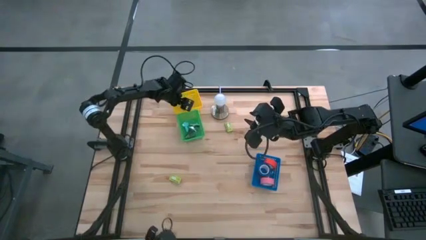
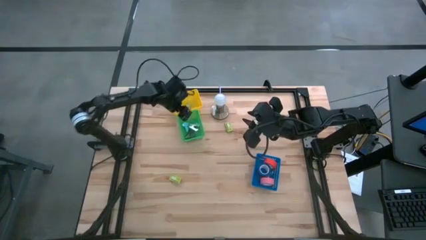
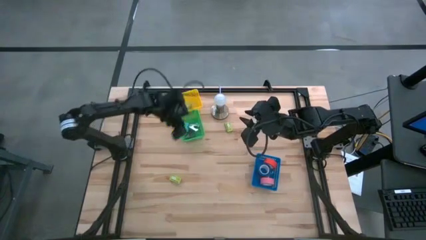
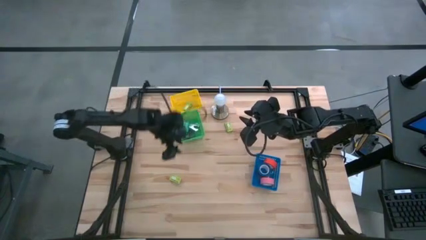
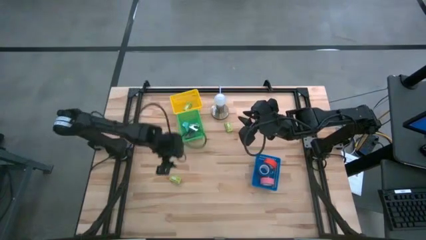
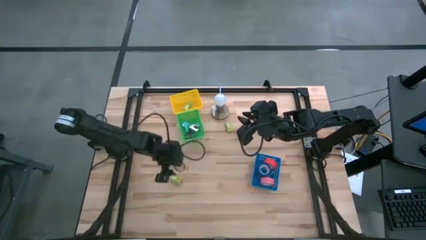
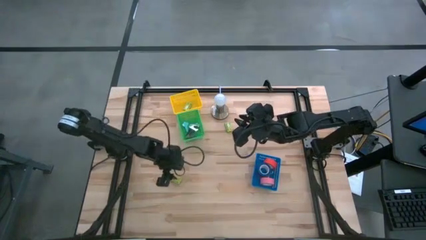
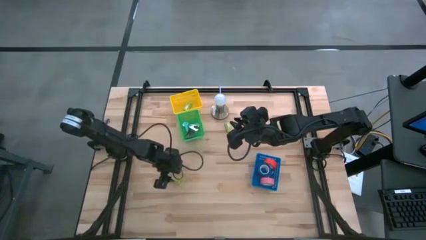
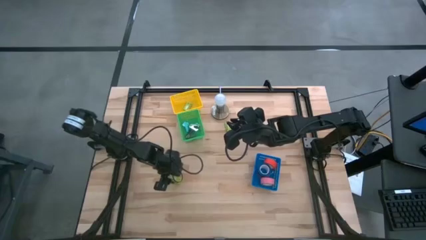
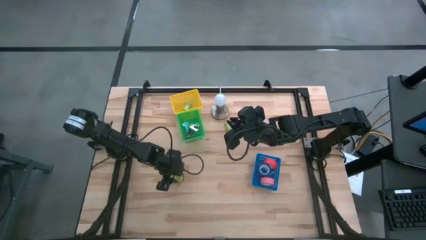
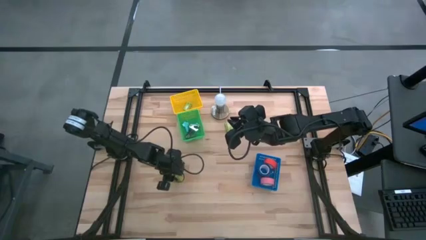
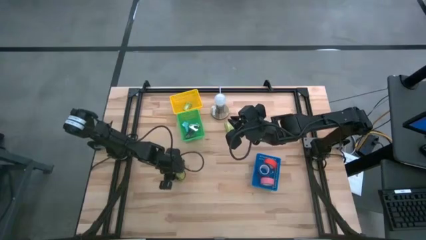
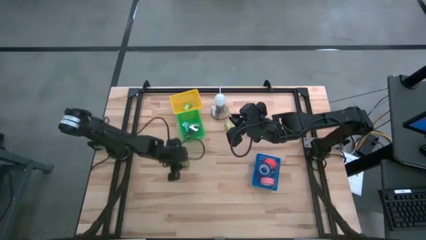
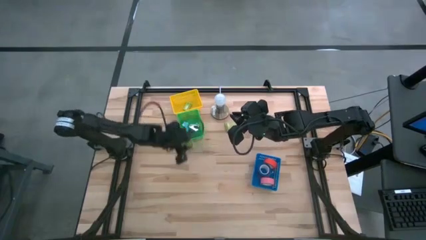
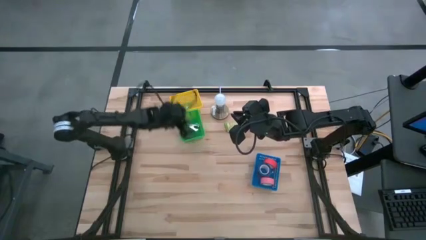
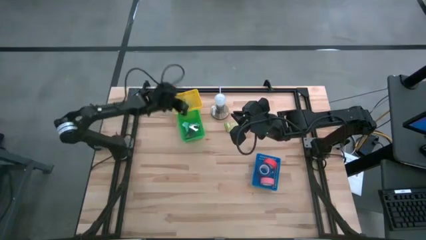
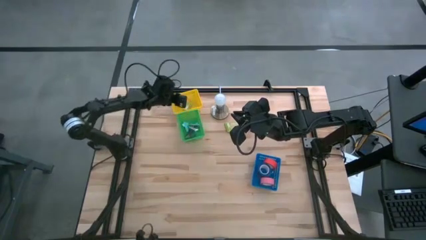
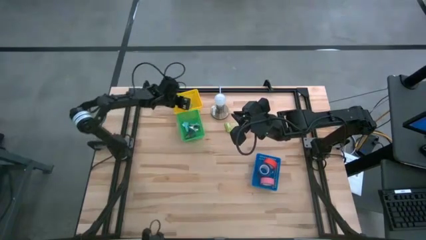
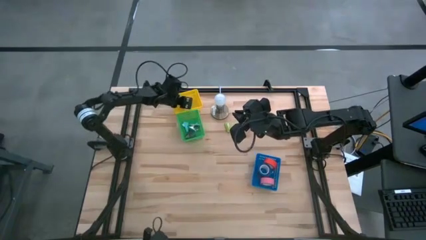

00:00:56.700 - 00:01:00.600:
Task: Pick and place Stapler, Stapler remover, tape
Put the light green staple box into the yellow bin

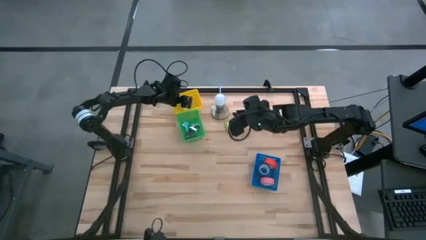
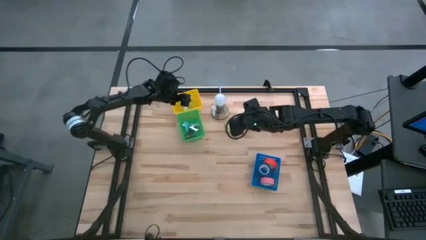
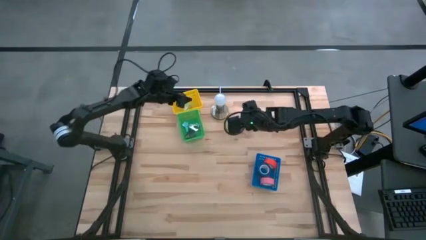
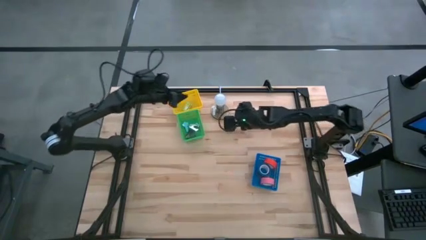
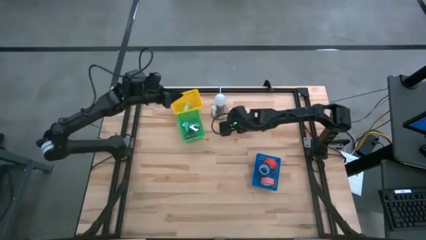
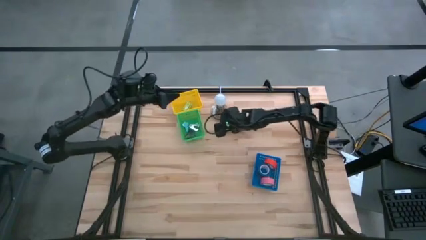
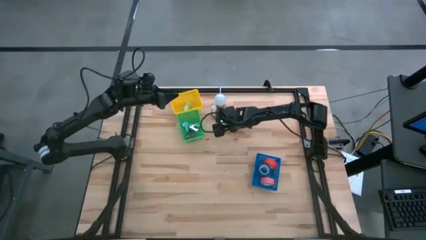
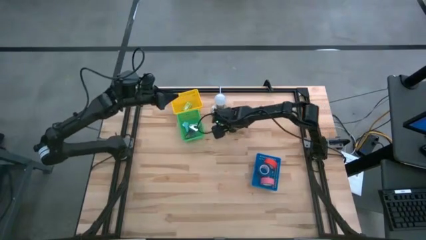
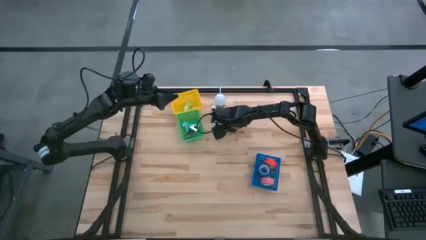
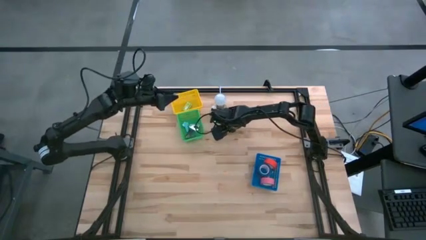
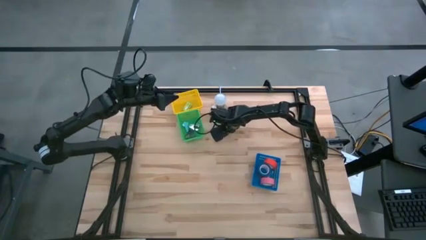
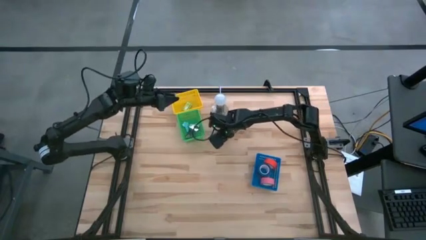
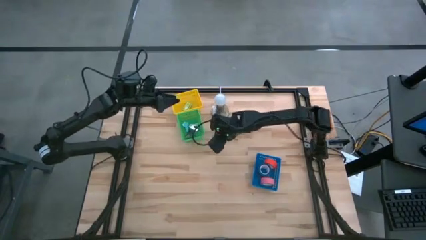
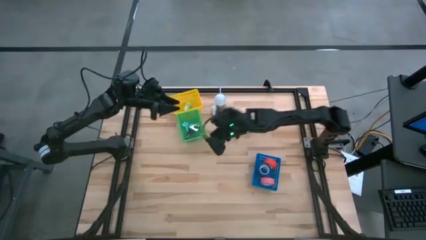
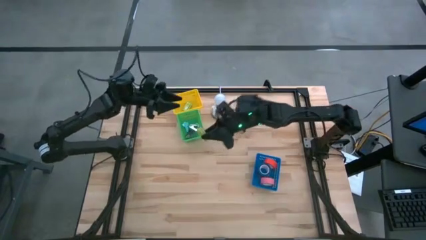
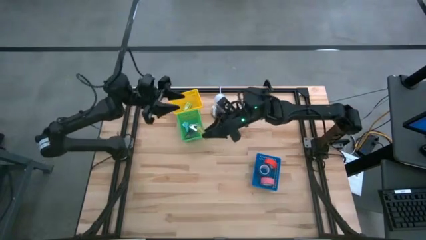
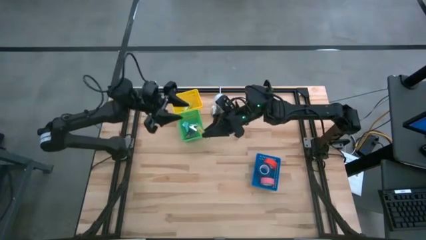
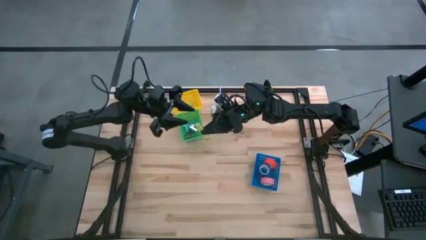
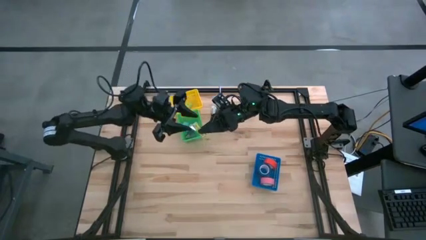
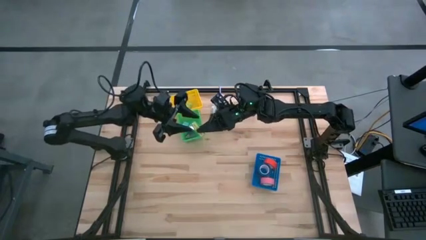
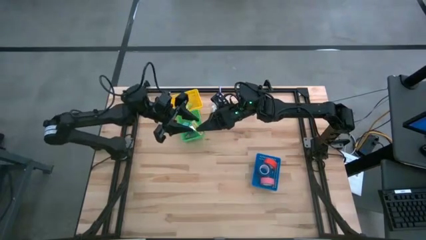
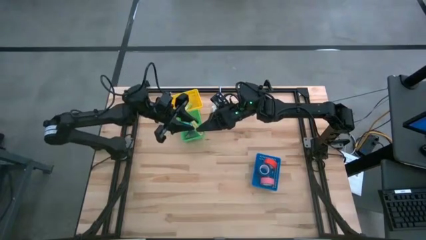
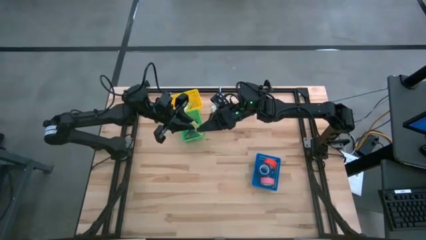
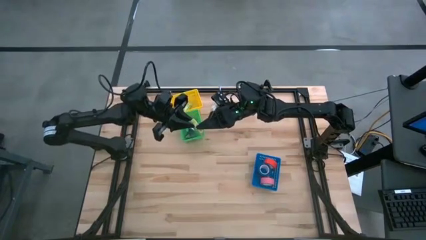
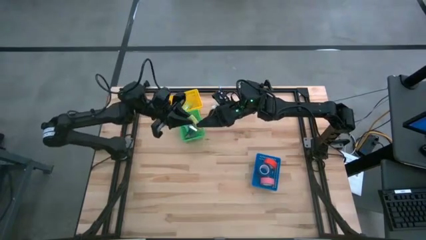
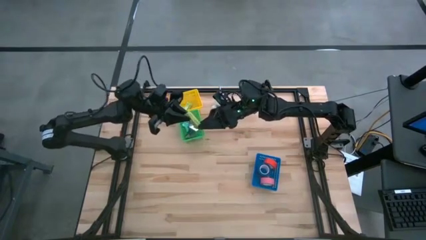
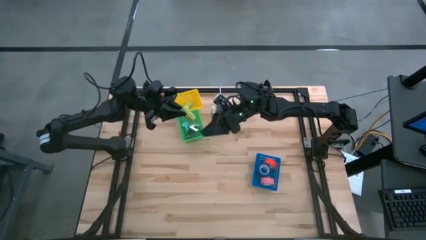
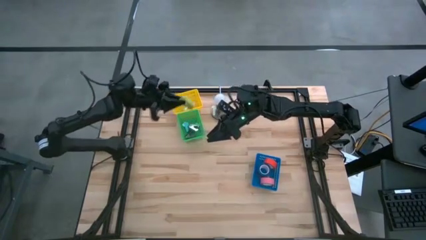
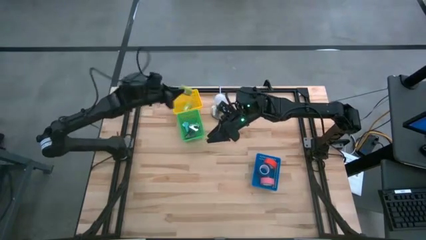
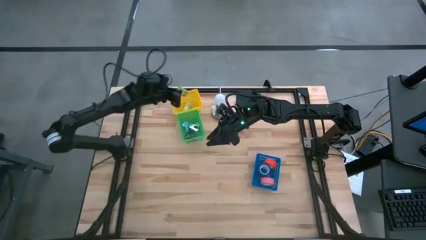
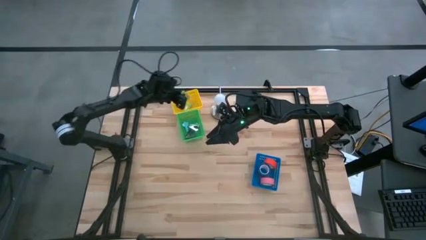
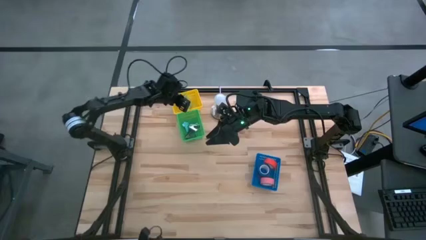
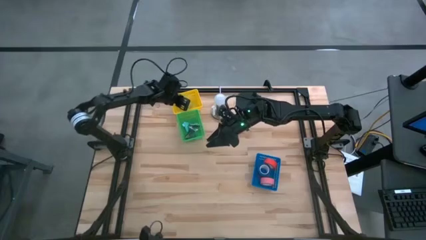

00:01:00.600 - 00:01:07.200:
Put the light green staple box into the yellow bin

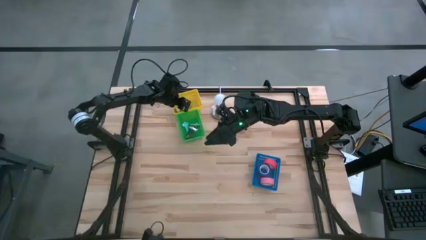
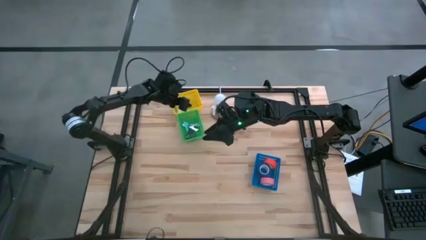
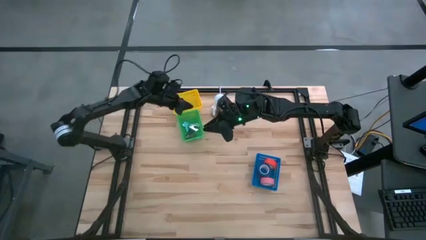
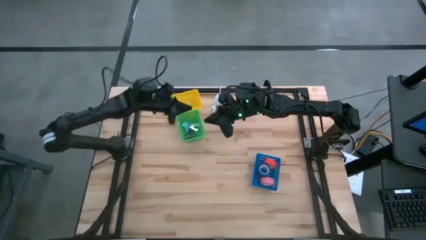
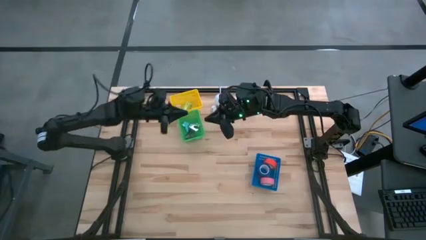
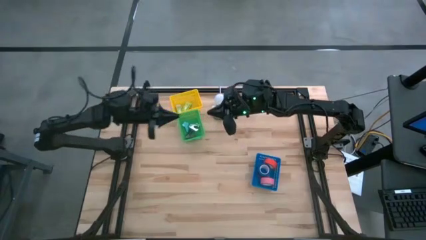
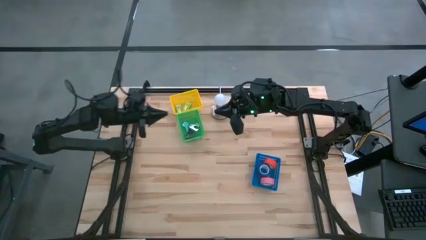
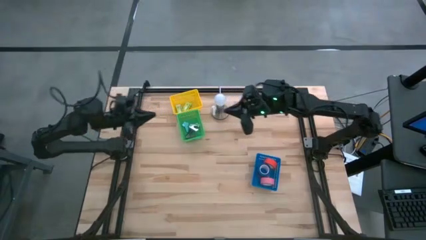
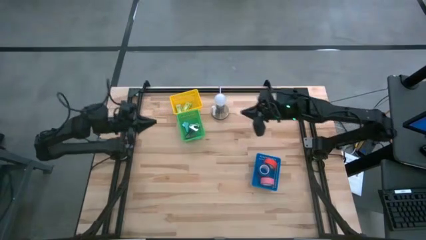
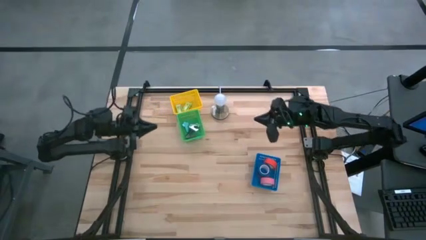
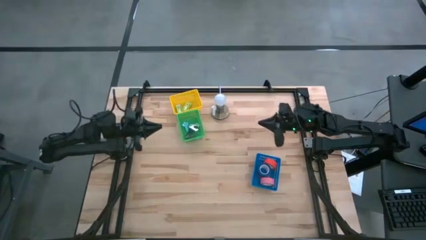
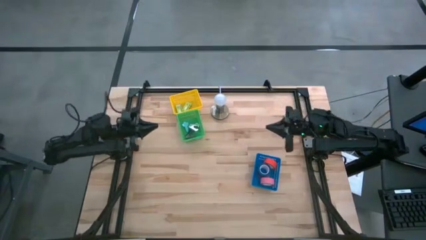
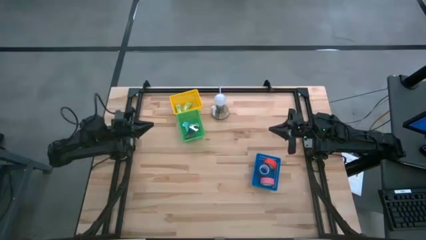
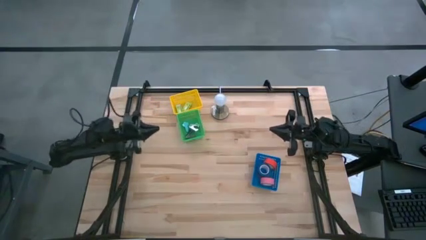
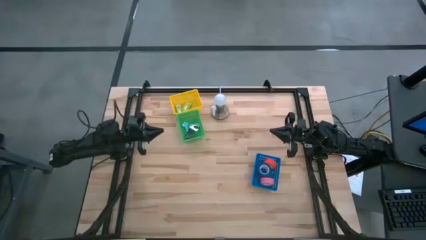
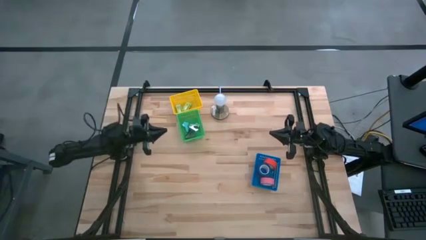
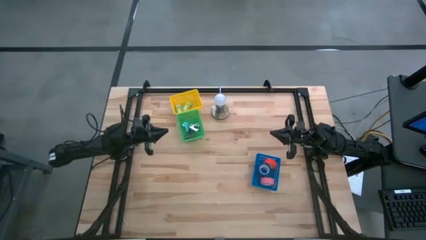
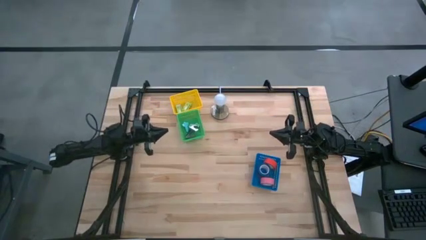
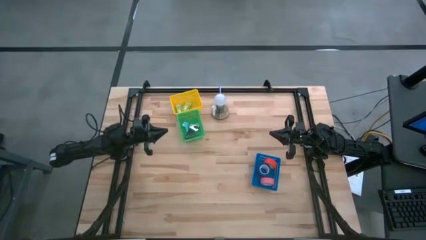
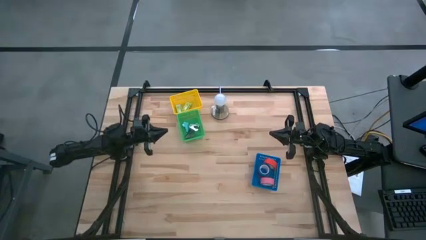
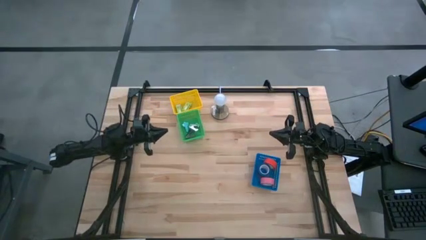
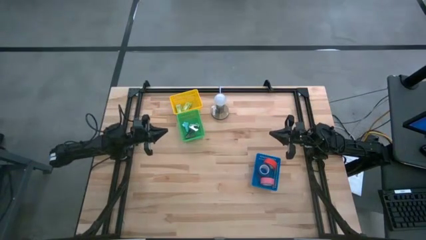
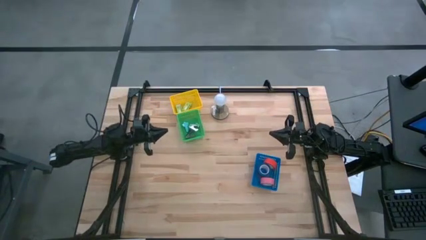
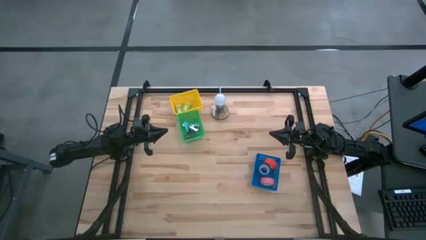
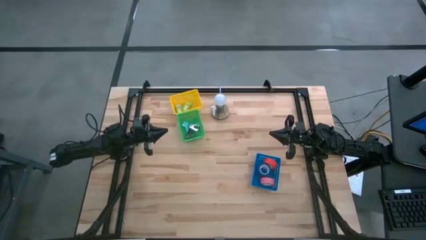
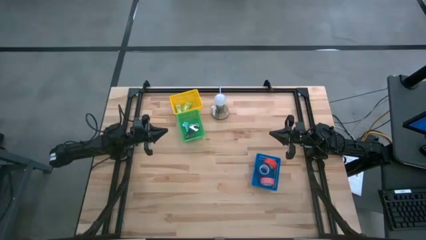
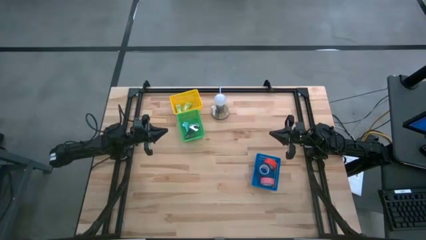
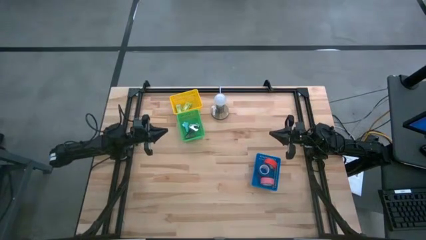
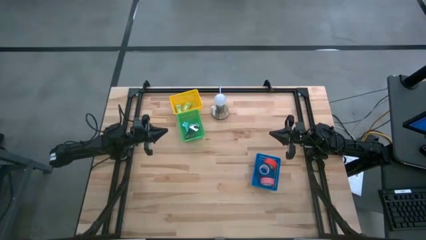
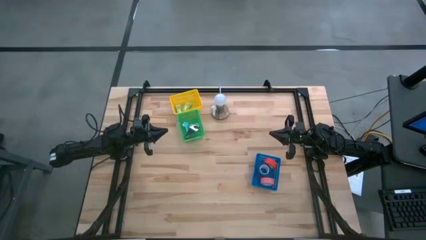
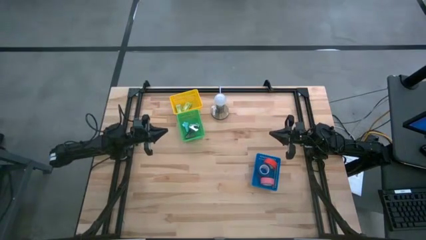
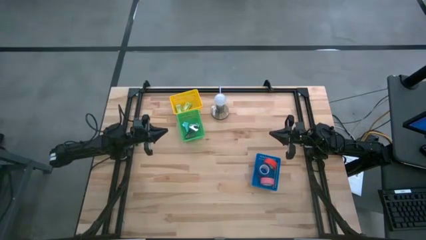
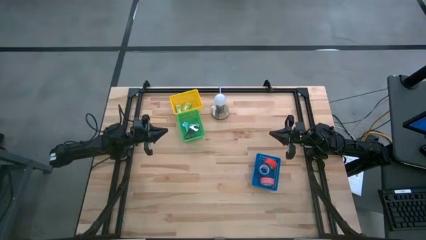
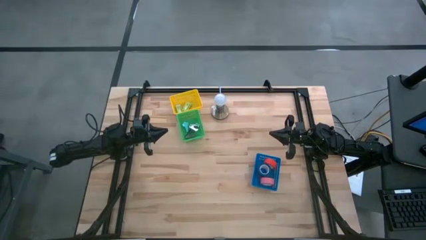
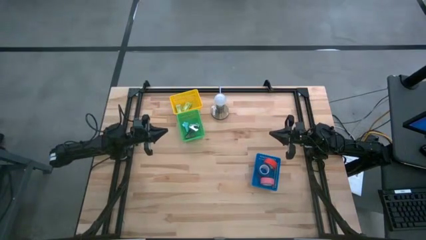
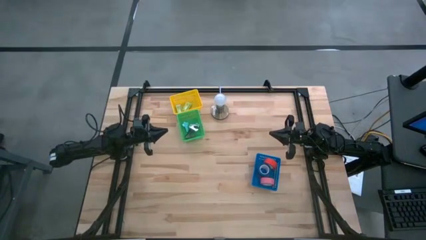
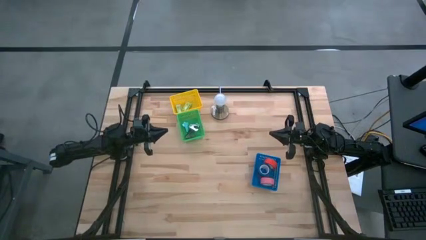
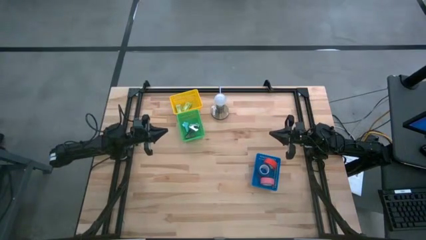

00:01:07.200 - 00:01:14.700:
Return to Home Position
